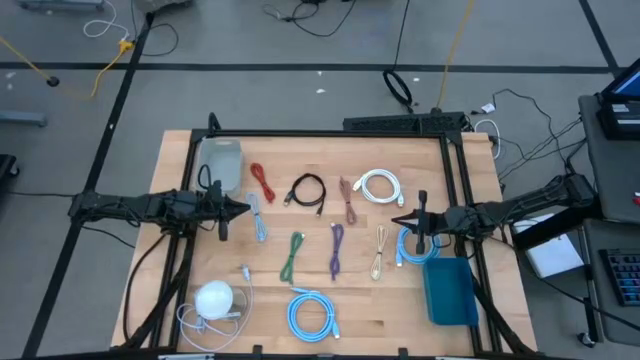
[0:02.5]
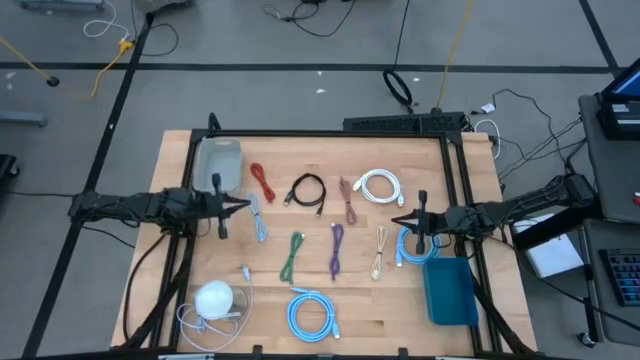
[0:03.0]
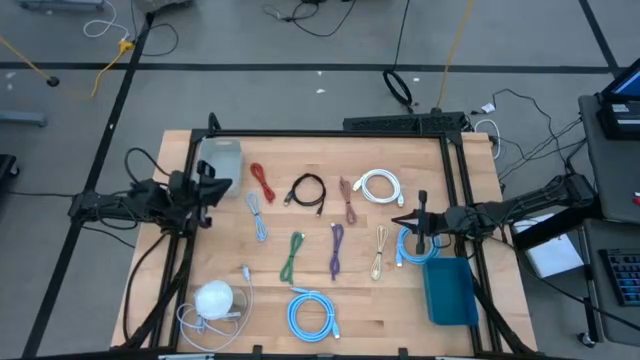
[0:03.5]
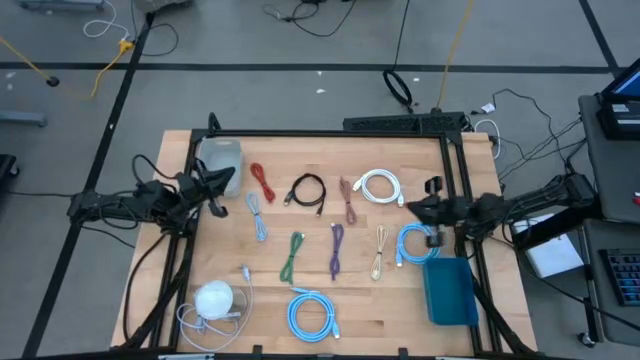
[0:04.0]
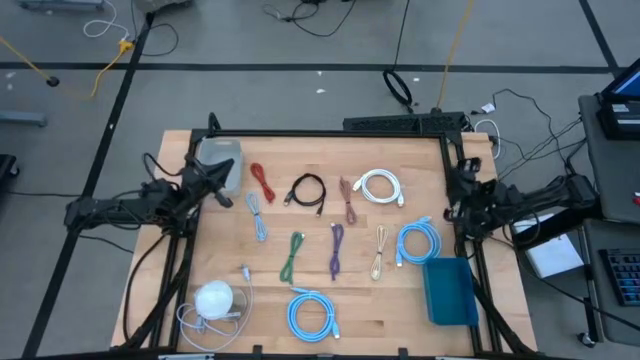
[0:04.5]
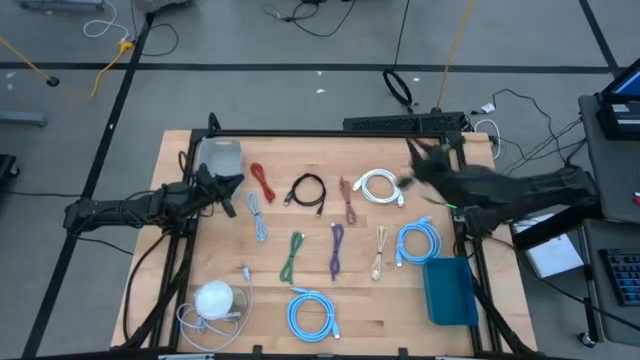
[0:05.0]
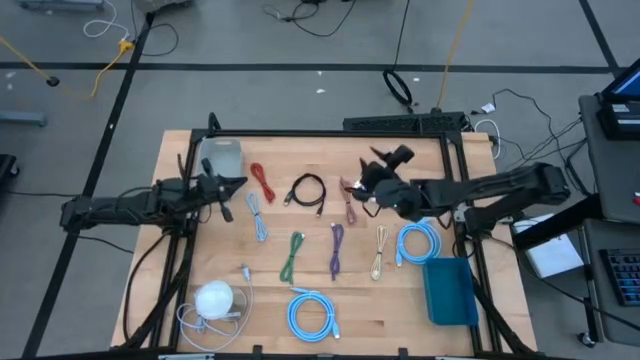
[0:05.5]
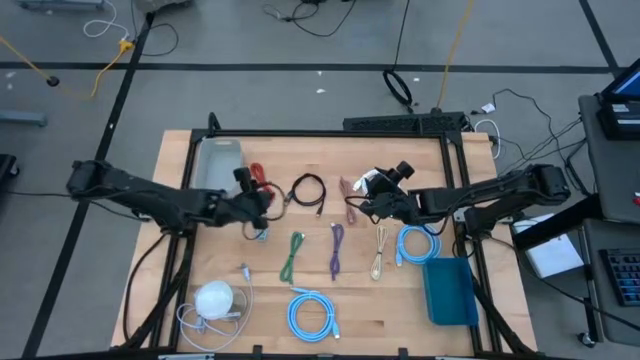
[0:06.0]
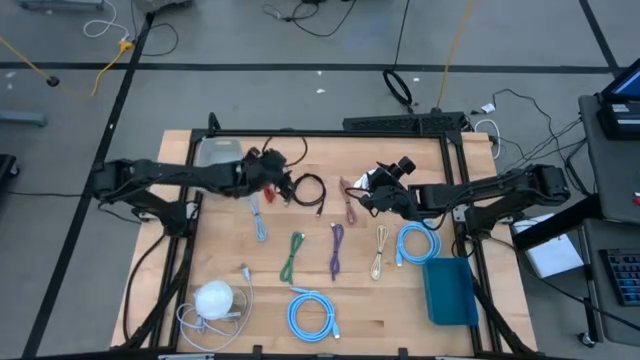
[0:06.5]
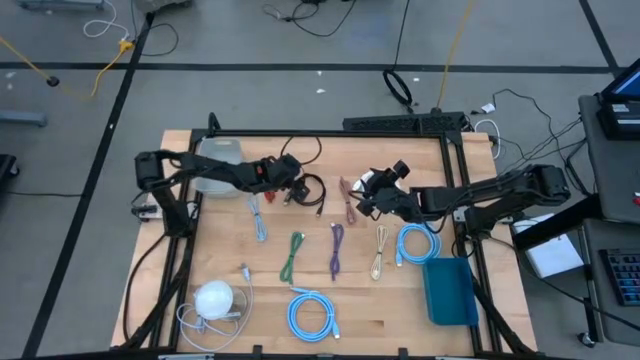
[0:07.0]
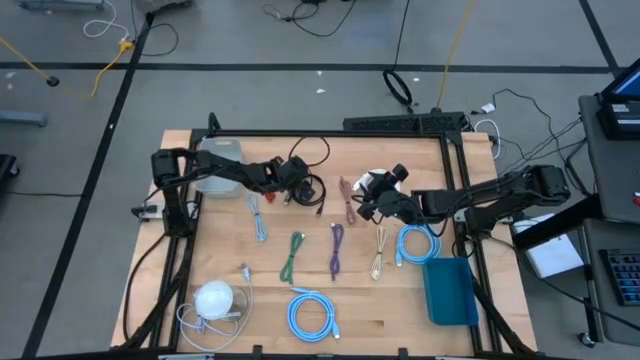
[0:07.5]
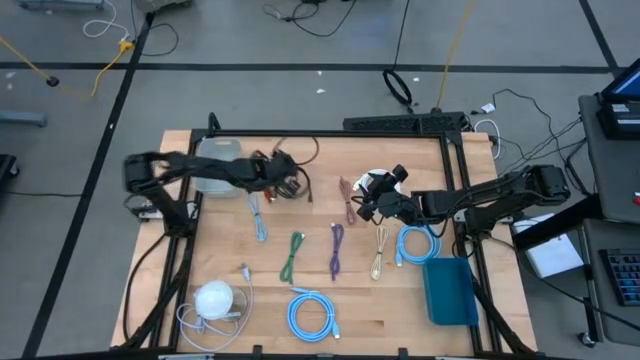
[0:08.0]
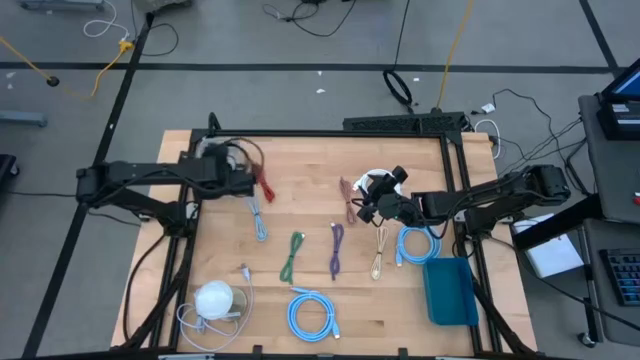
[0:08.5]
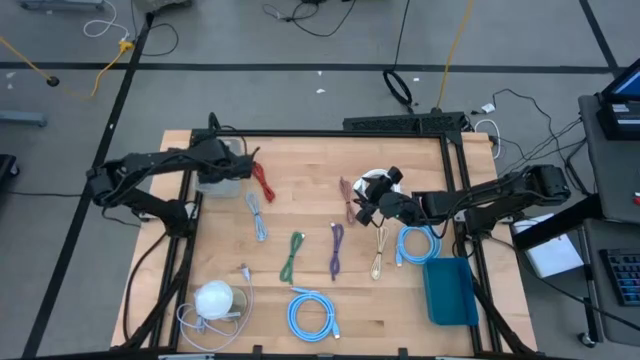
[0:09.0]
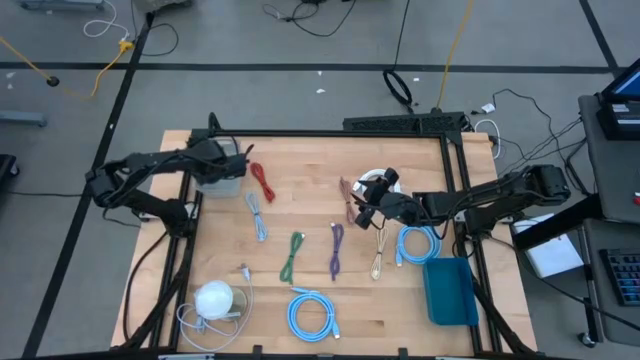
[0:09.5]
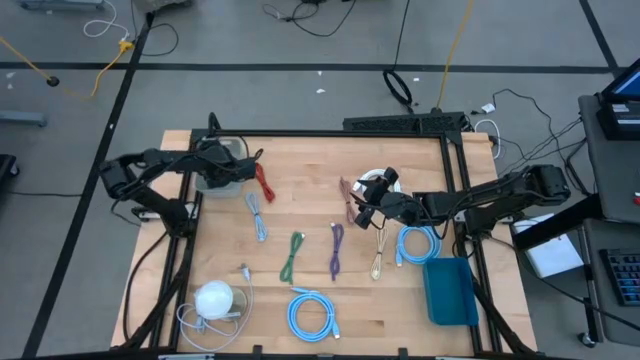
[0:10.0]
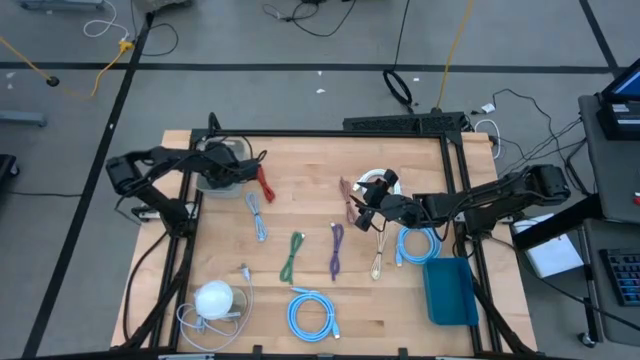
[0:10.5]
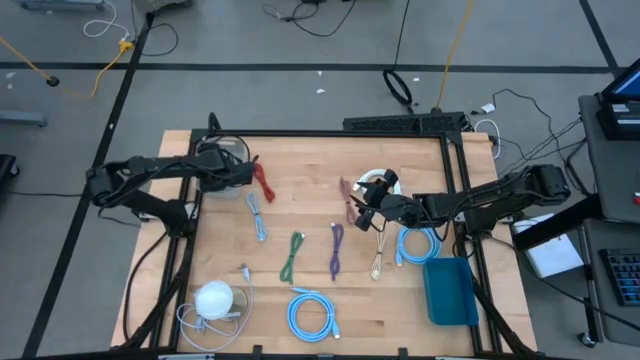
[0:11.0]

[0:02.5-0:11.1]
Task: Pick & Place USB Port
Put the black HDMI cable into the gray basket

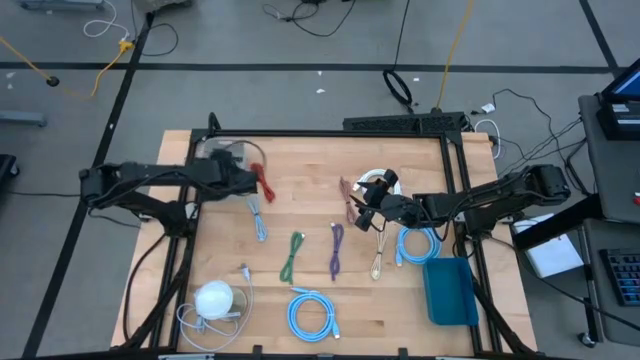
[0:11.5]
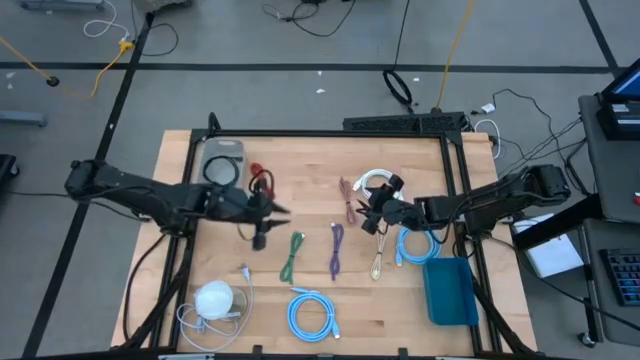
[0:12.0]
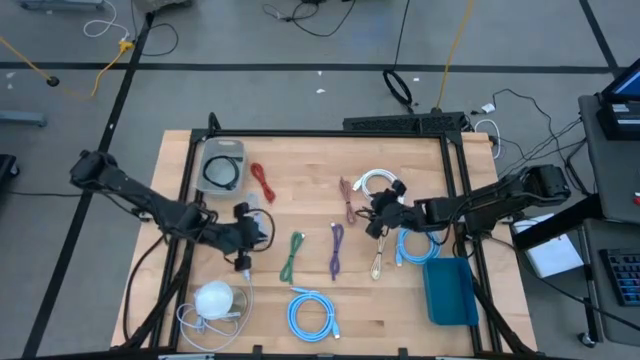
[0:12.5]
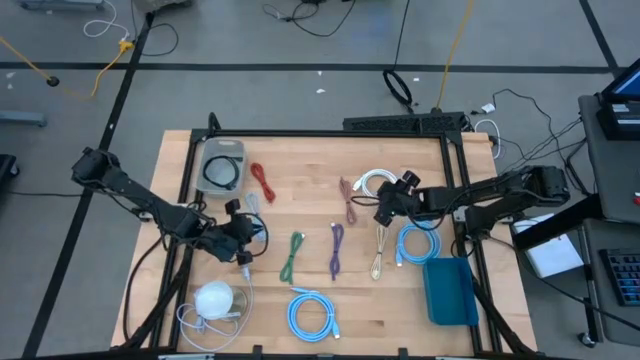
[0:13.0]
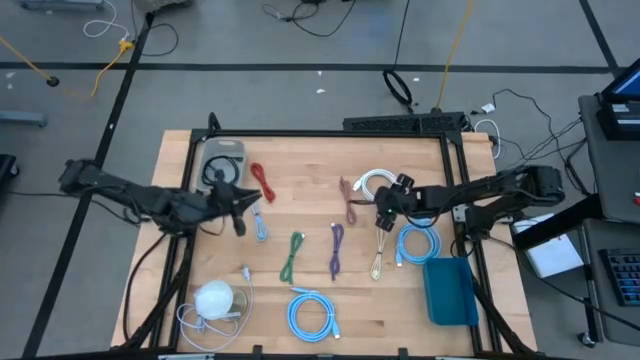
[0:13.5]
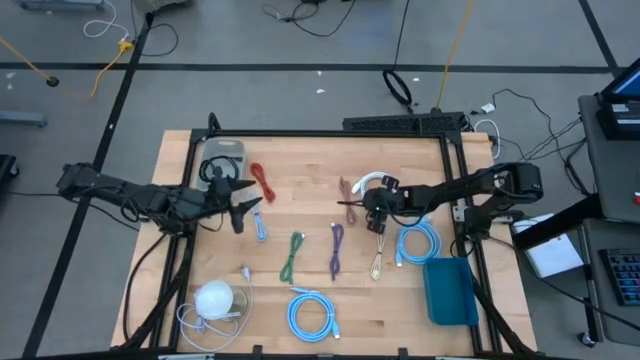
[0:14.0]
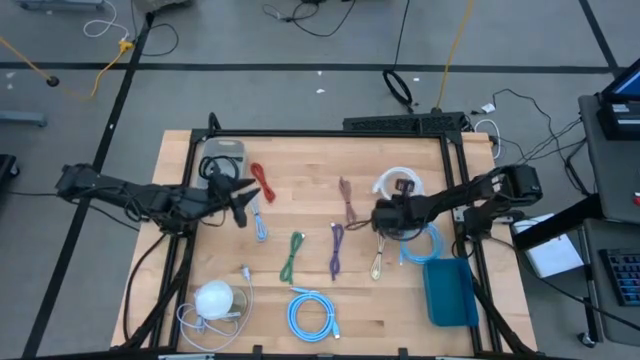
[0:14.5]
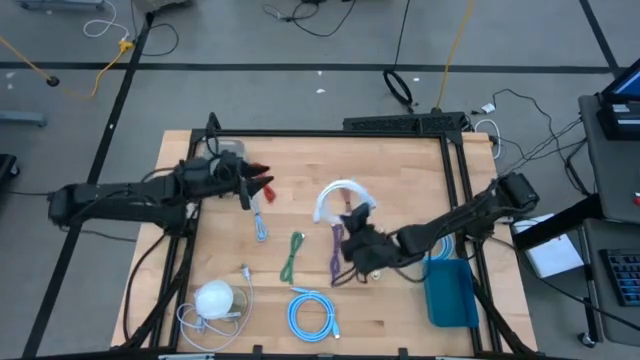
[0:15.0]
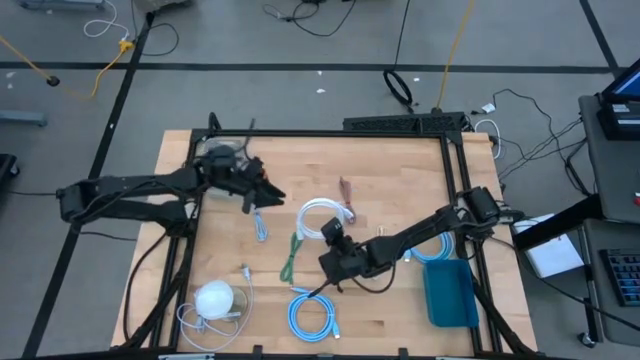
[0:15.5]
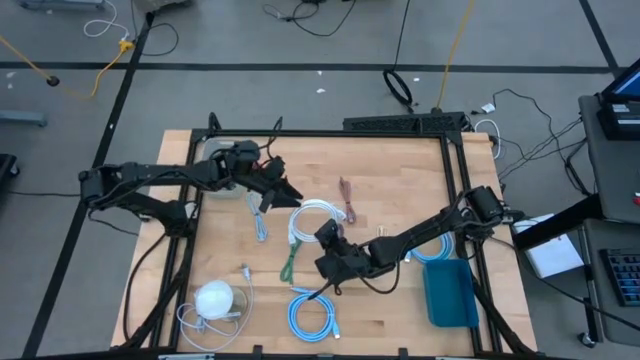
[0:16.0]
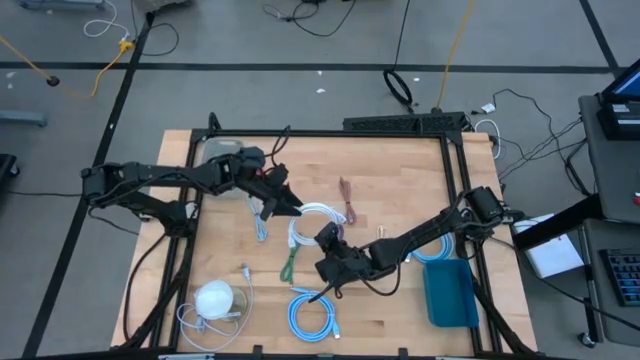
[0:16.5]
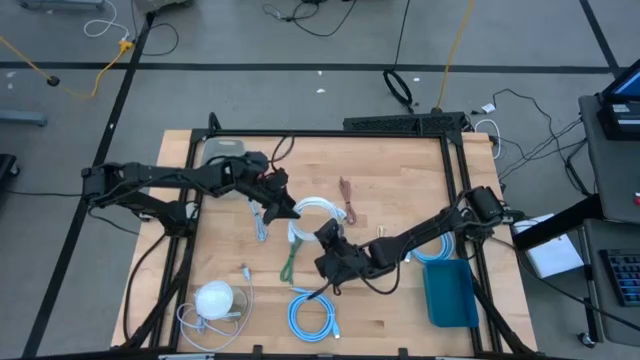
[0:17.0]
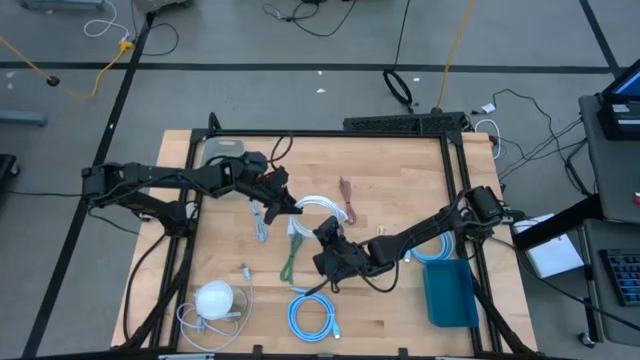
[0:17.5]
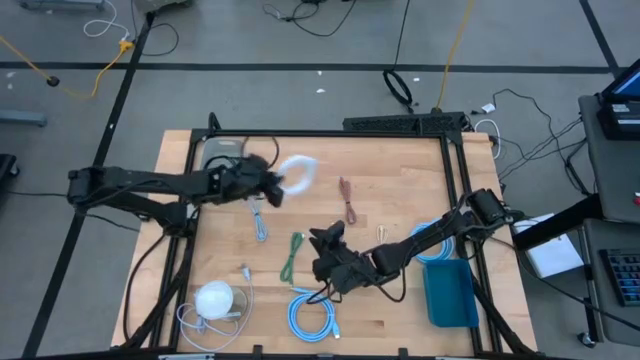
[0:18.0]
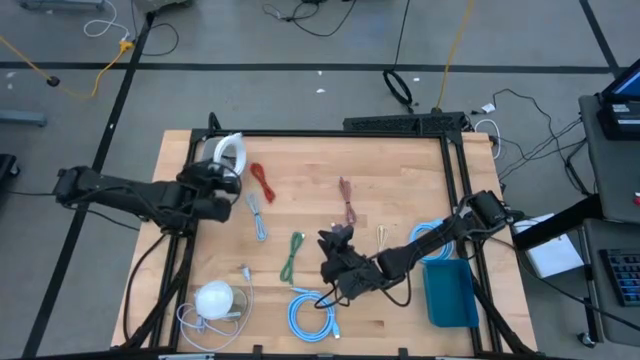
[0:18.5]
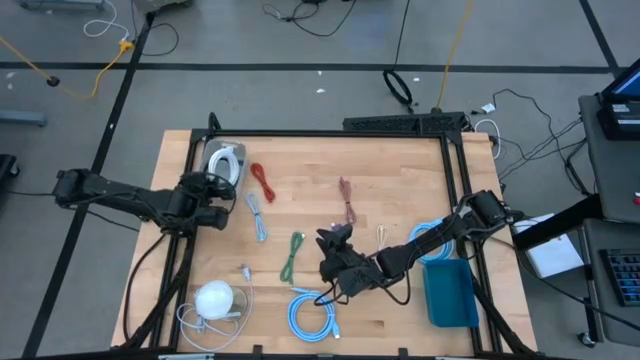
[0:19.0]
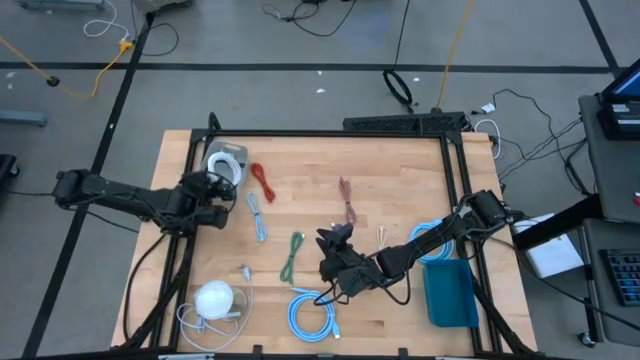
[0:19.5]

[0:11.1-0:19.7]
Put the white HDMI cable into the gray basket

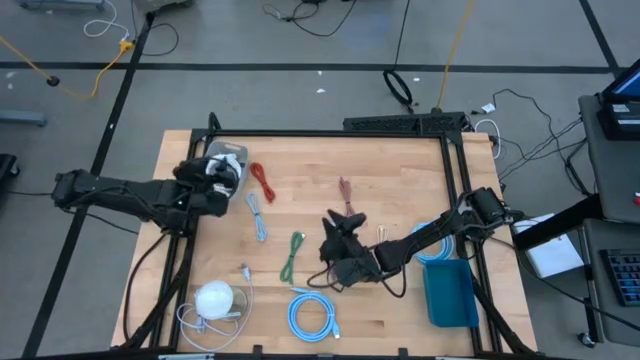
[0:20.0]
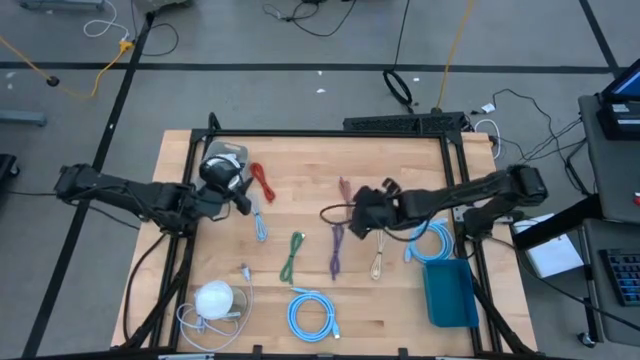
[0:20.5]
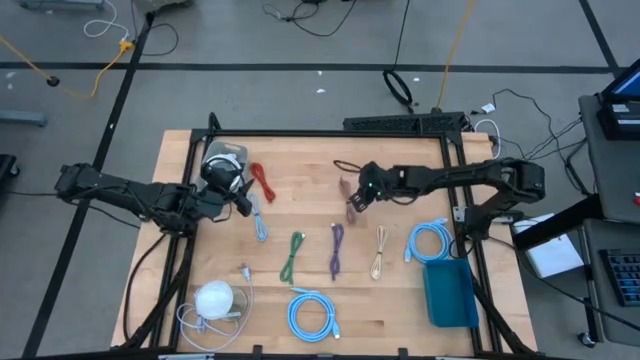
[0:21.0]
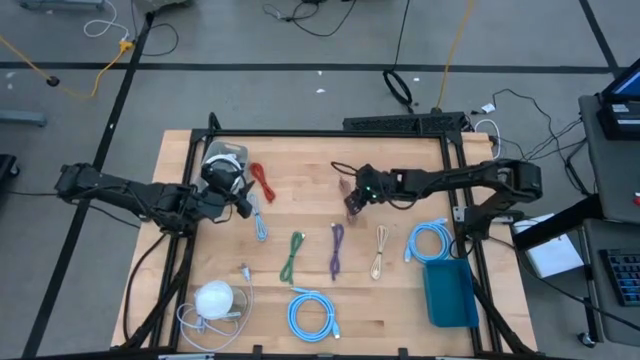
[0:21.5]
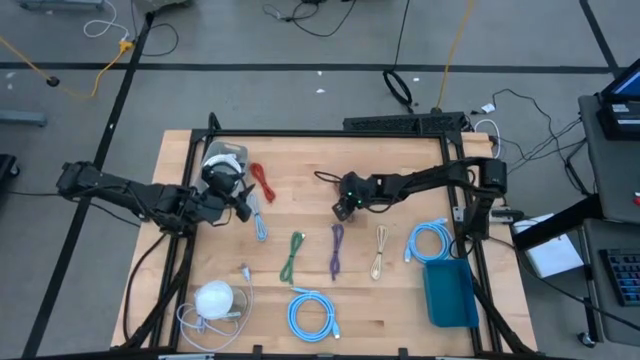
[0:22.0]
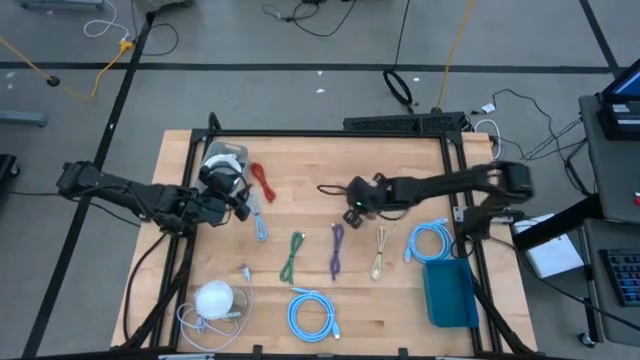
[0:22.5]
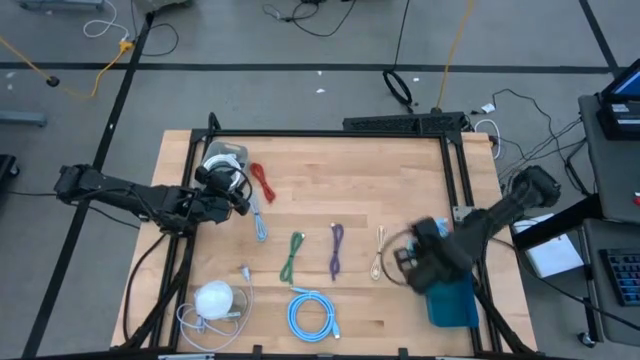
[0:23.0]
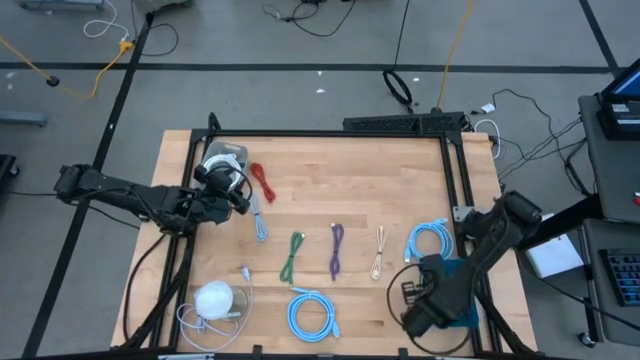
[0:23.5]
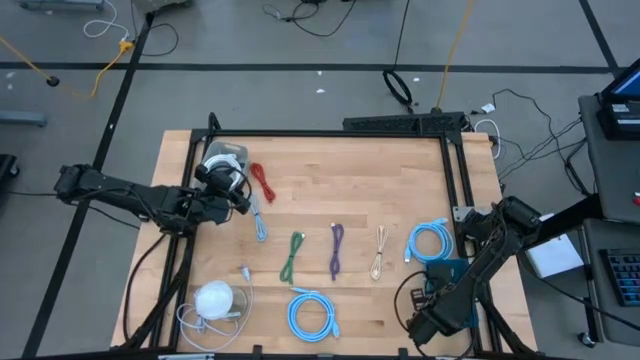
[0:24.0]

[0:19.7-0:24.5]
Put the pink USB cable into the blue basket
